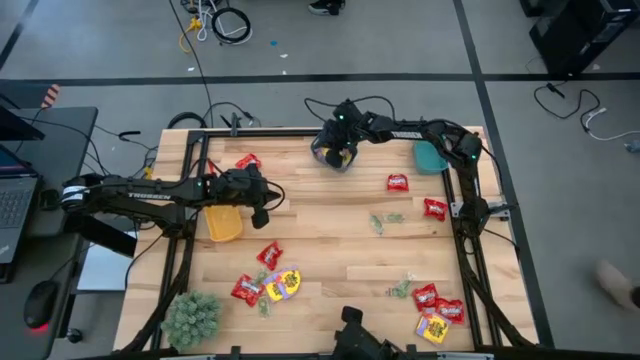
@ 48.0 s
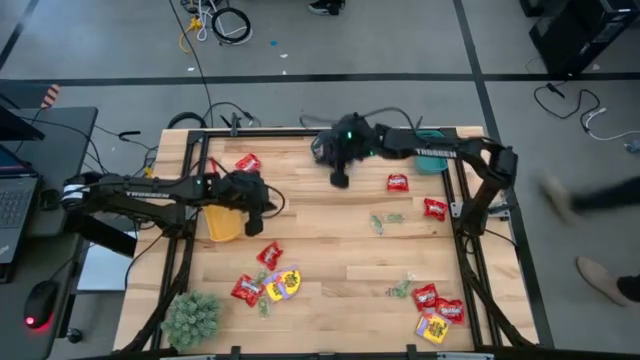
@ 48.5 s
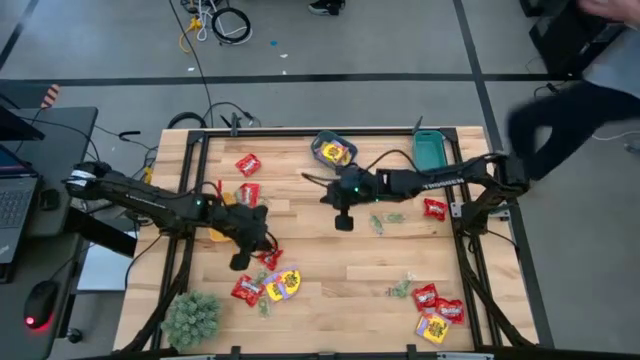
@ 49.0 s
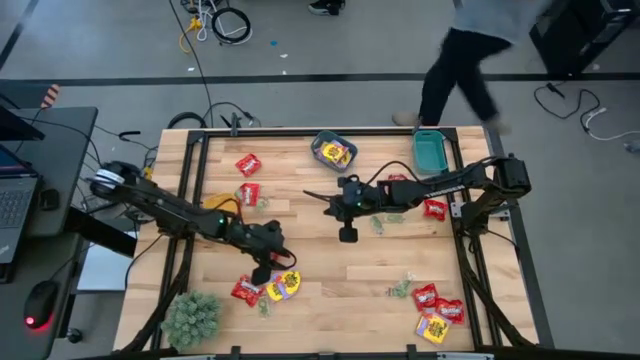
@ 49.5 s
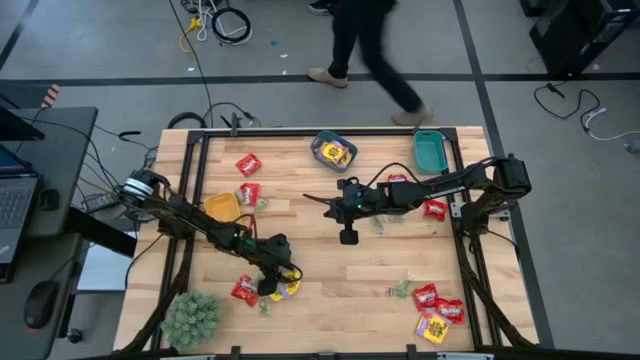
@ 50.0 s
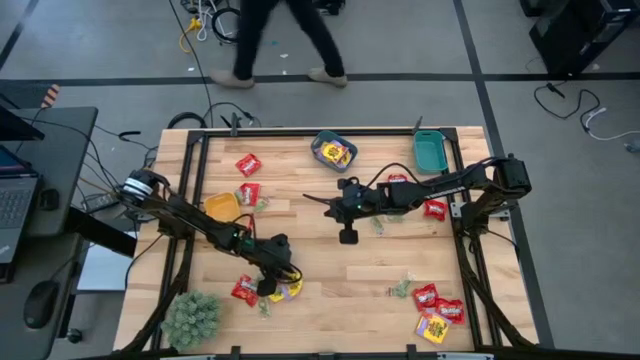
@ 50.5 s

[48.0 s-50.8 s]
Task: Sort candy
Put the yellow candy into the blue bin

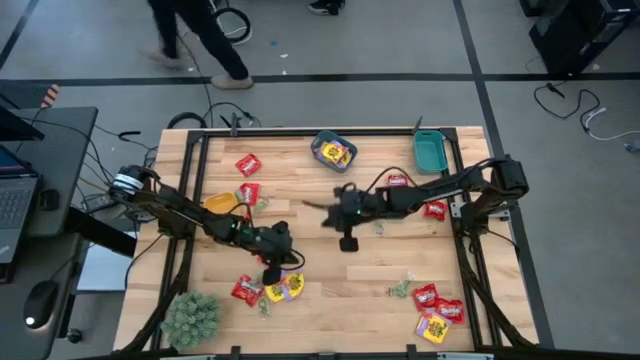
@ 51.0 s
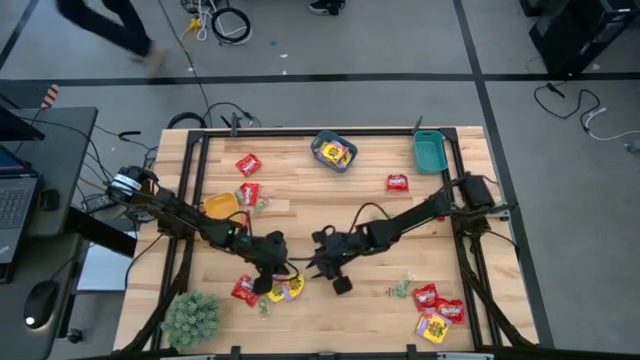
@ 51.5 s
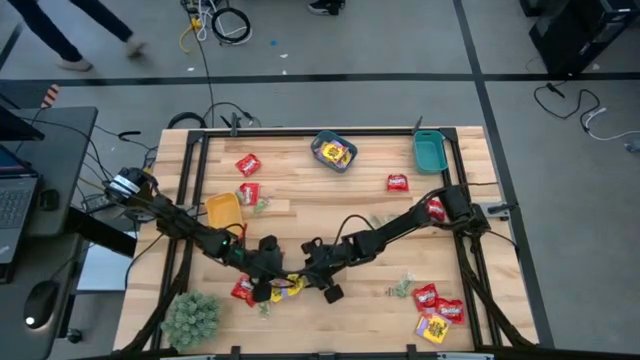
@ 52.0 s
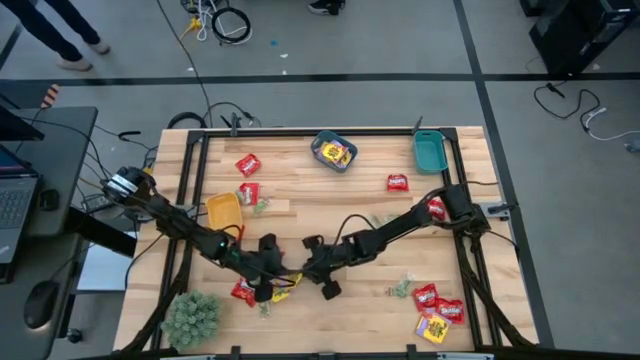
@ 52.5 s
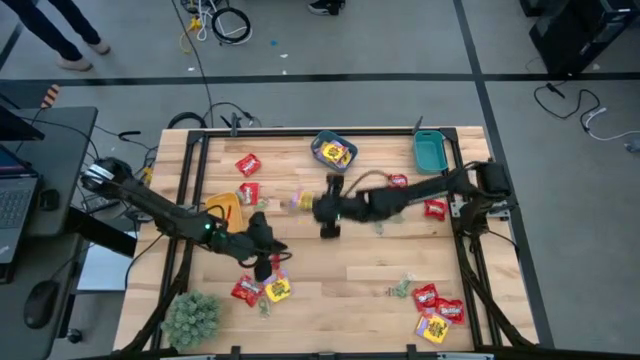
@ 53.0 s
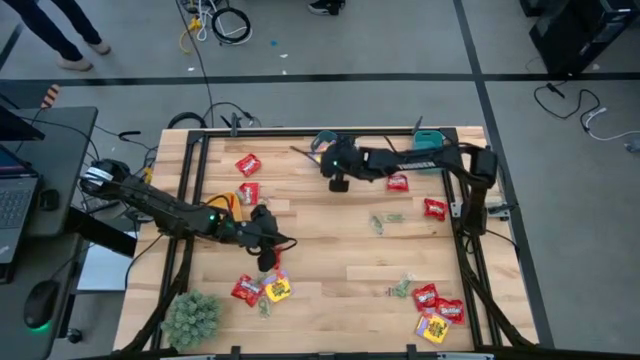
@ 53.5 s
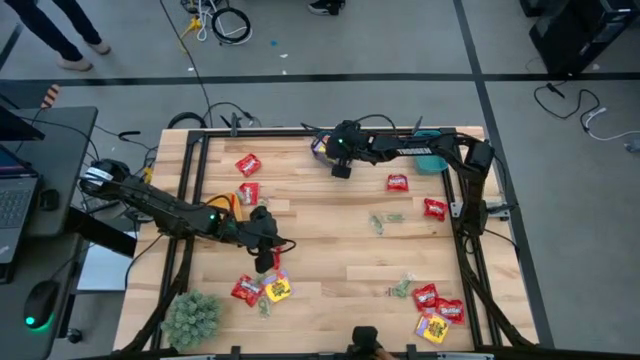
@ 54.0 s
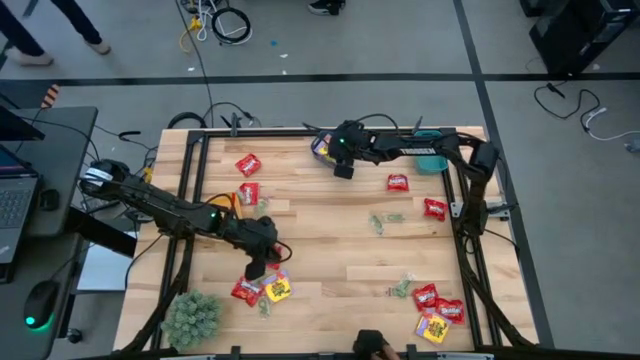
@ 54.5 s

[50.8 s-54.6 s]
Put the yellow candy into the blue bin

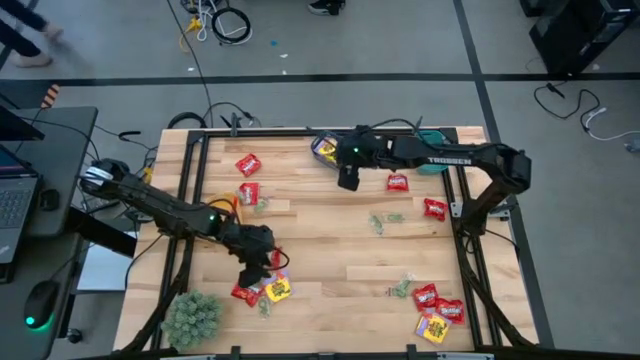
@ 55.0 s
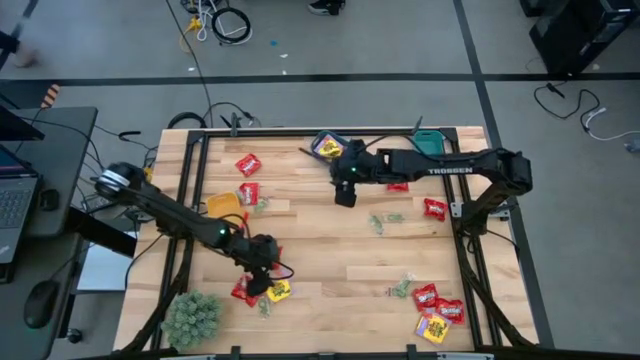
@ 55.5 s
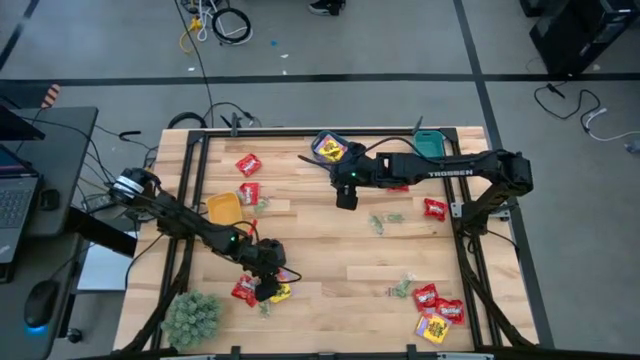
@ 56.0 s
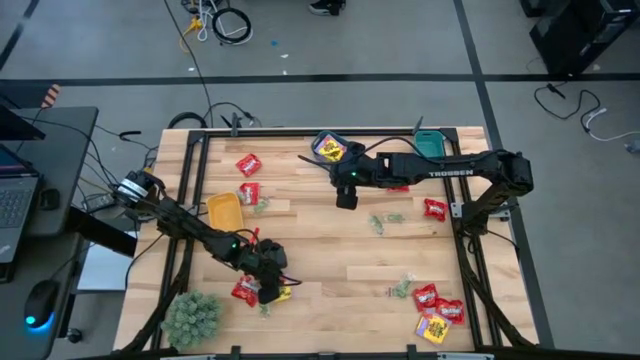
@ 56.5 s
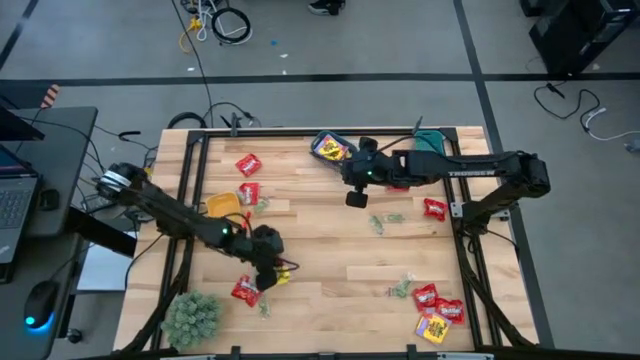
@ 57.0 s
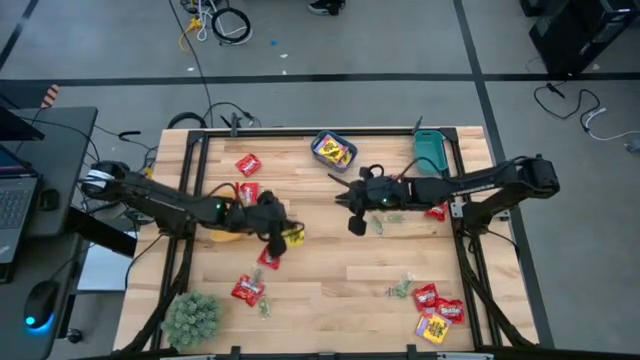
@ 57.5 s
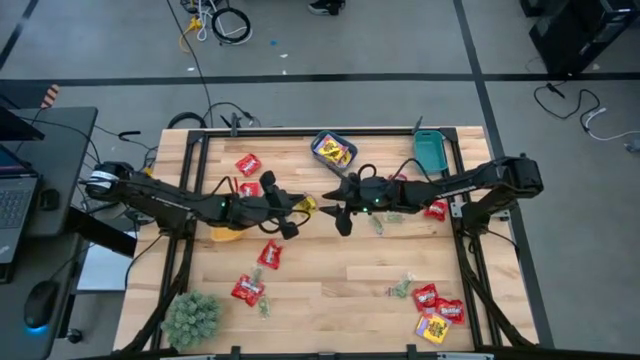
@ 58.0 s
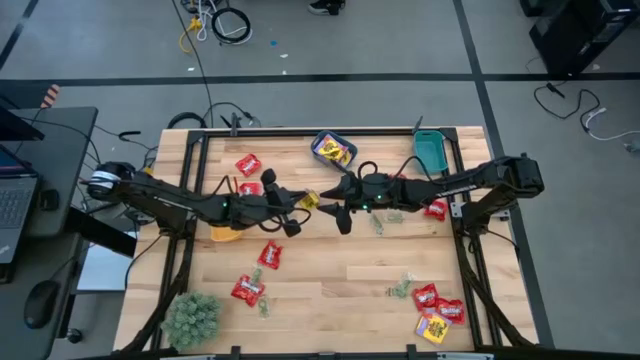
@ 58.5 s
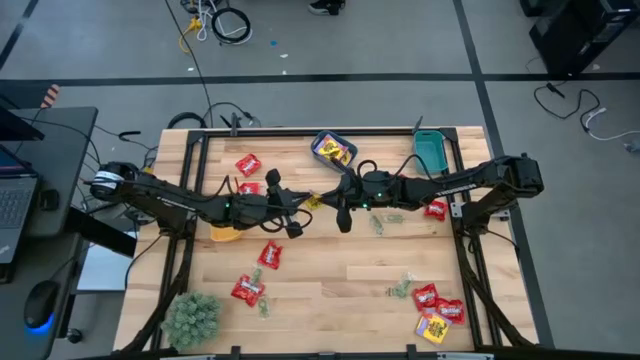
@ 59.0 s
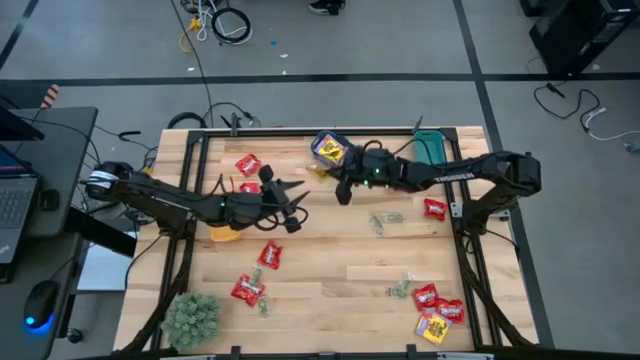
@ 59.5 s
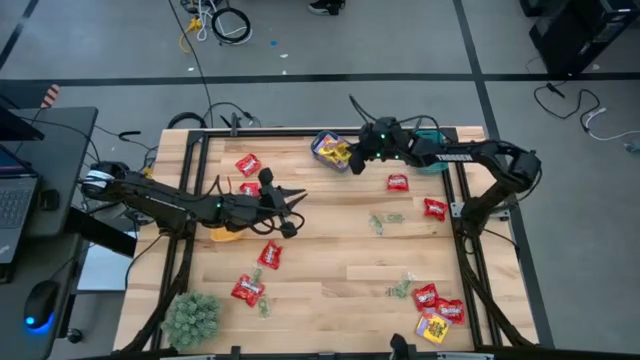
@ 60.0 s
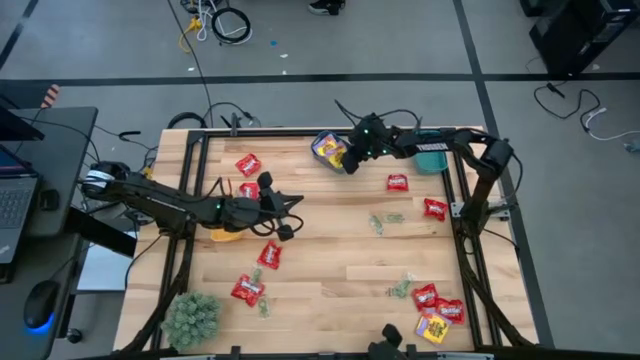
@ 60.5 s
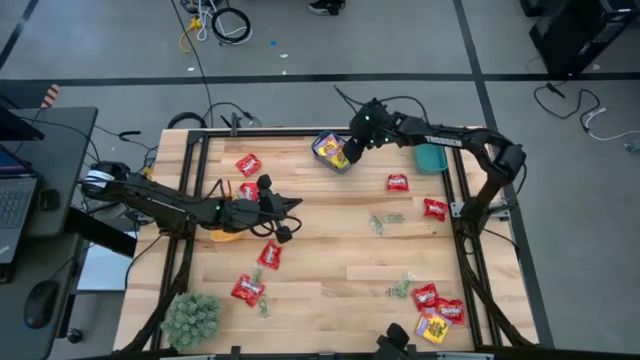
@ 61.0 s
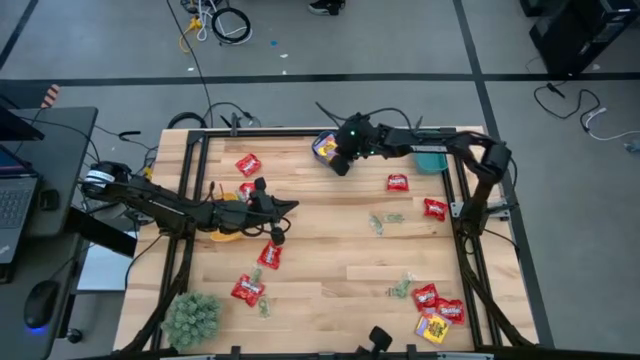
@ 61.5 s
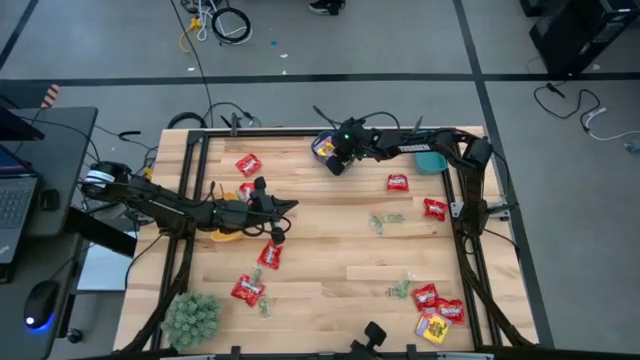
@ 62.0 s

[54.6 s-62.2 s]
Put the yellow candy into the blue bin

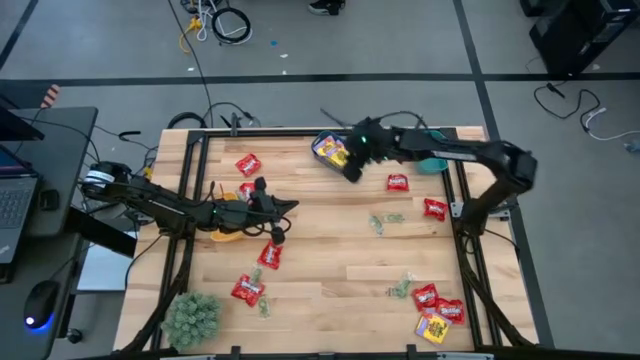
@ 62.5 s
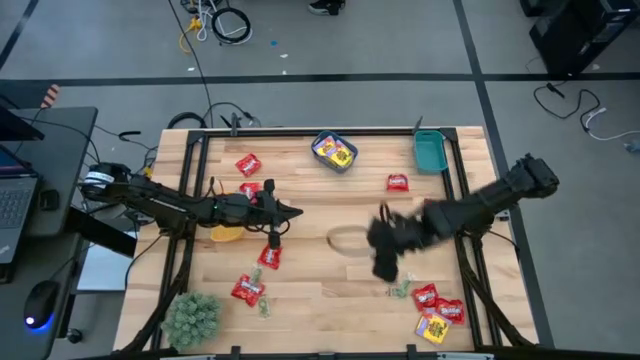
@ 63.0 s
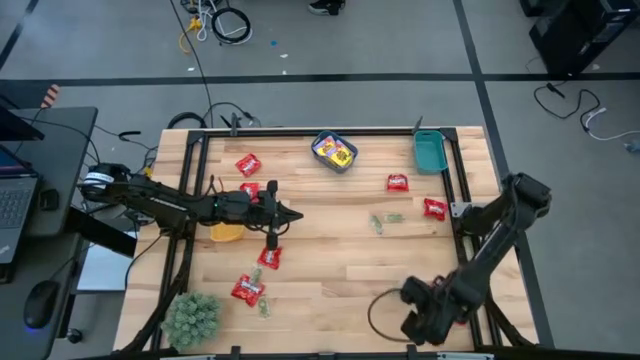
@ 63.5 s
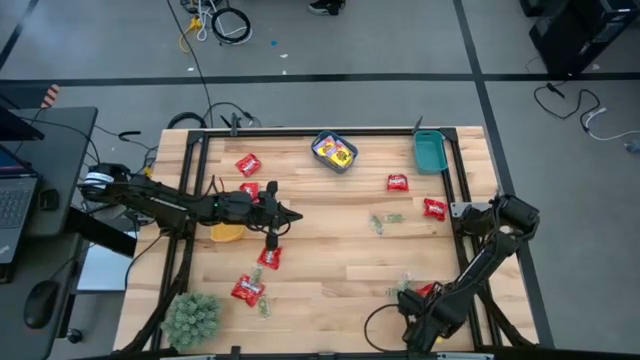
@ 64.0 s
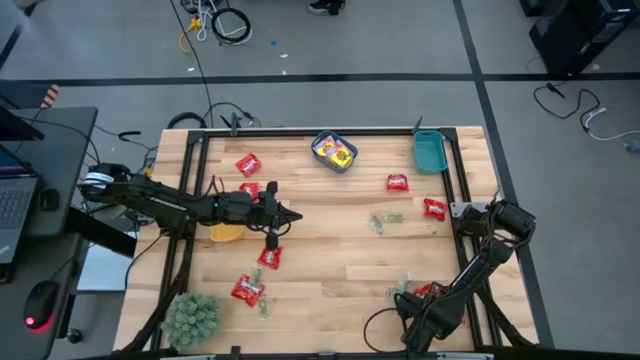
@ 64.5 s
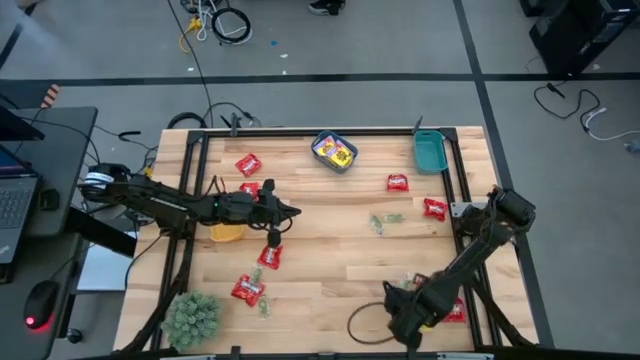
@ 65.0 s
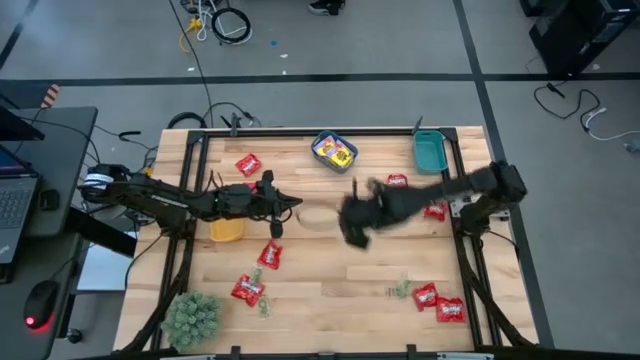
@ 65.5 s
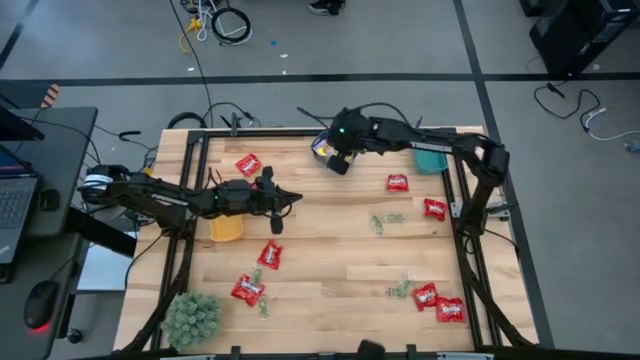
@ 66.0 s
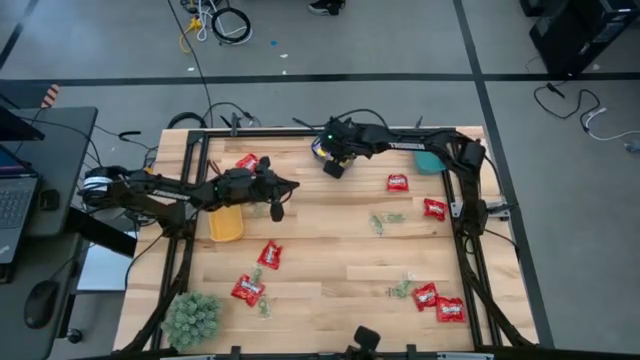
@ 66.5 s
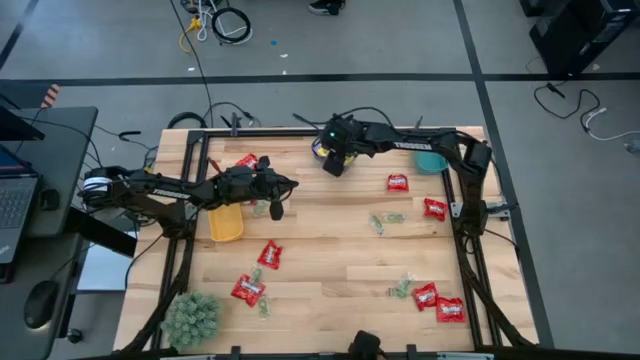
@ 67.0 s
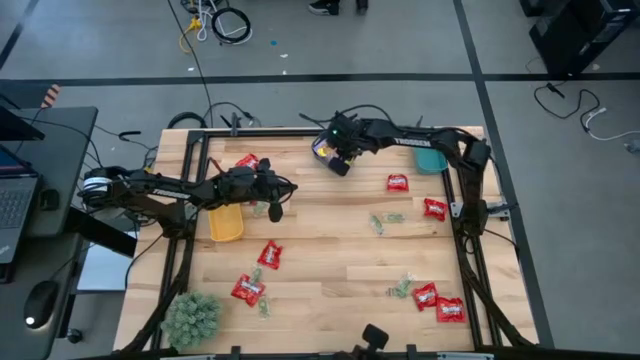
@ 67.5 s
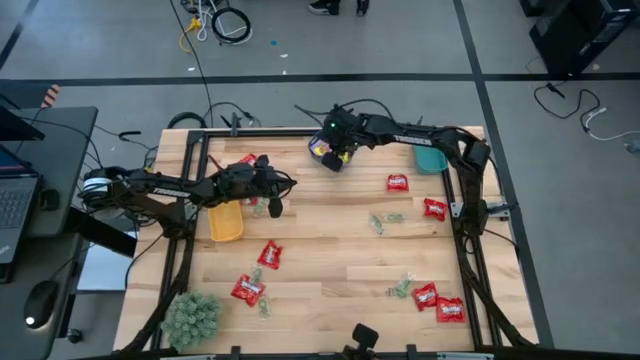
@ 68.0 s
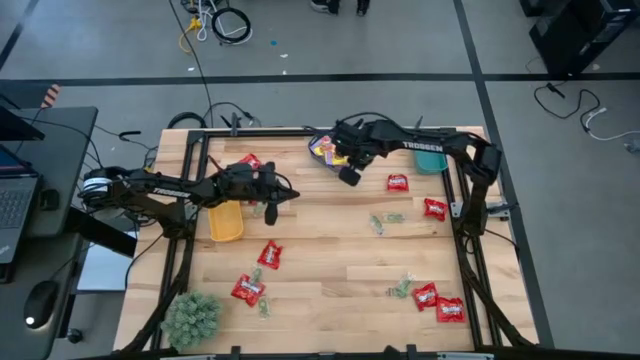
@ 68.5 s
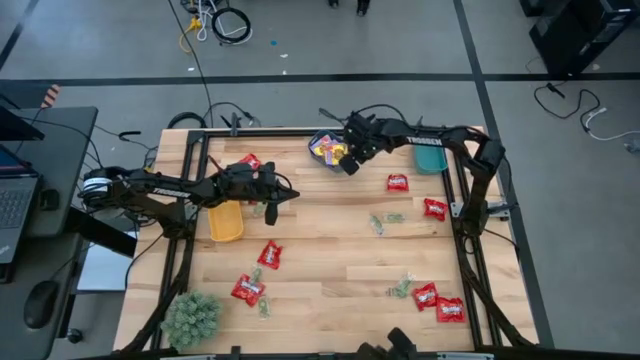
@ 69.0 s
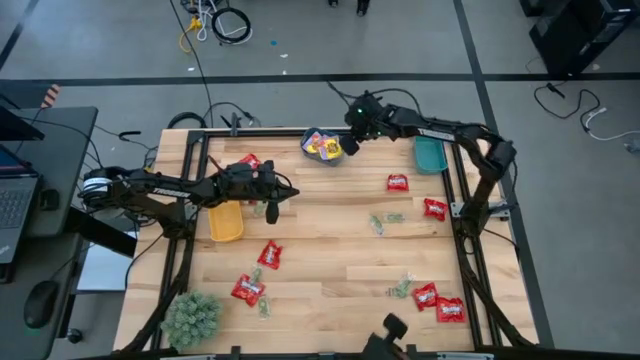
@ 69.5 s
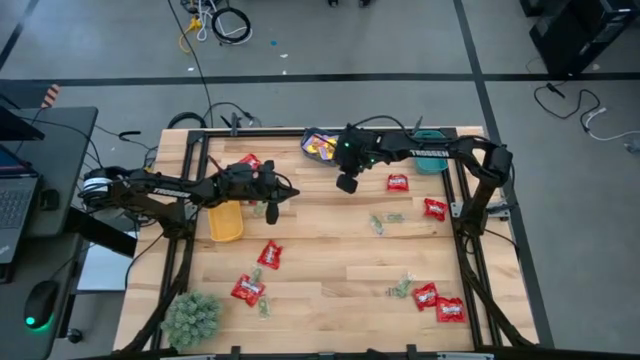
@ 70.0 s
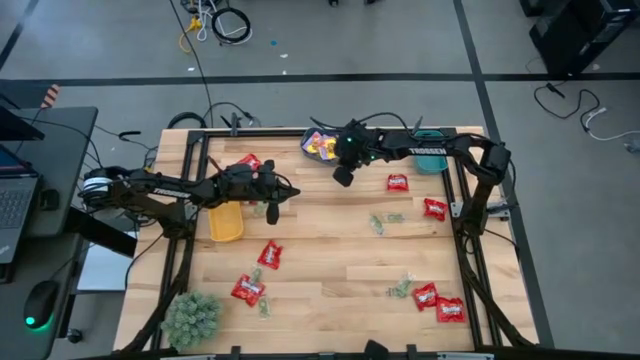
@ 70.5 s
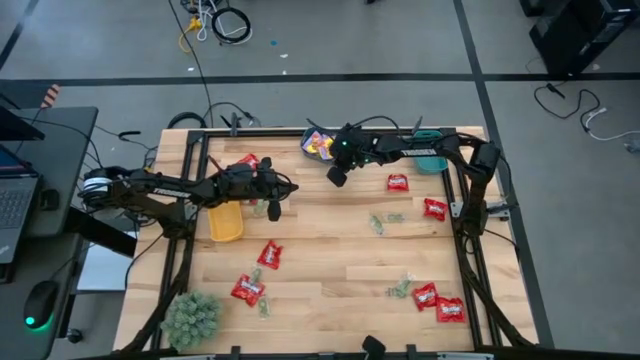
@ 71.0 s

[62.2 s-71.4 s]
Put the yellow candy into the blue bin
